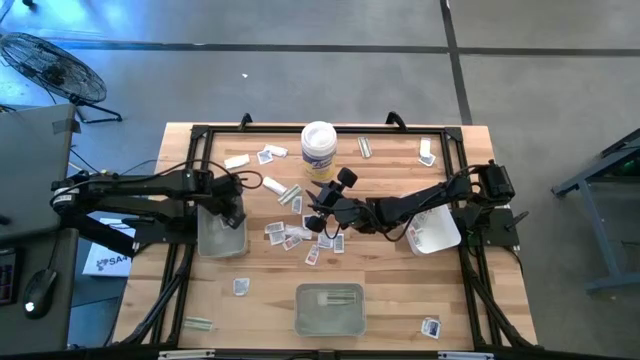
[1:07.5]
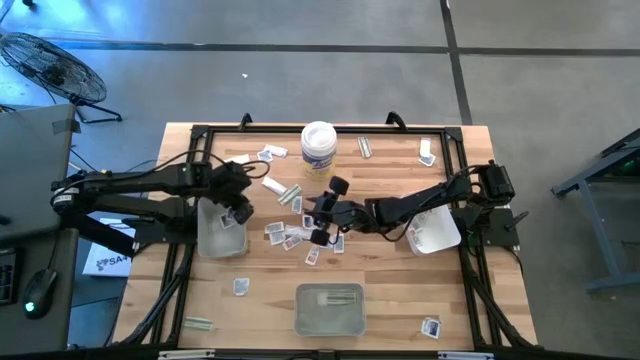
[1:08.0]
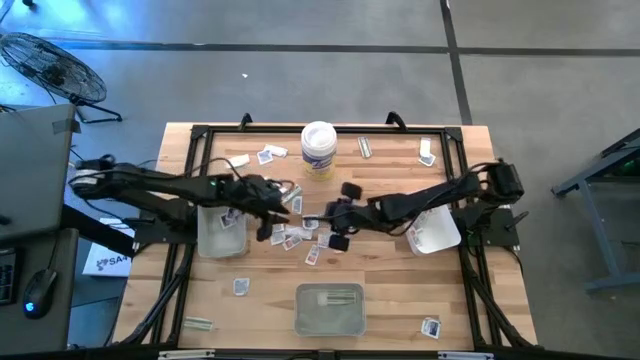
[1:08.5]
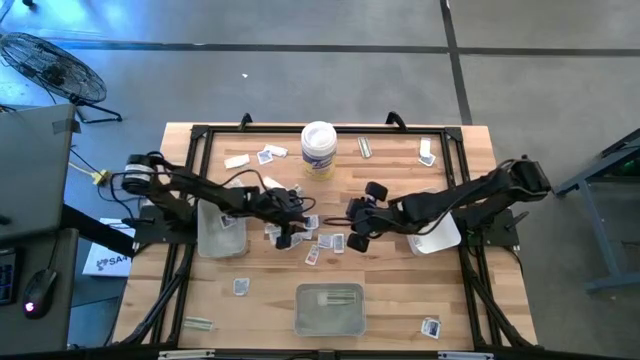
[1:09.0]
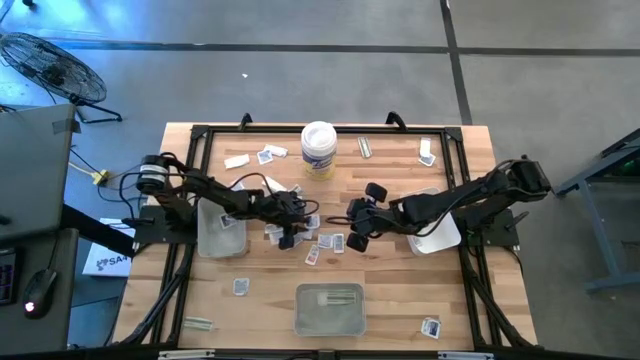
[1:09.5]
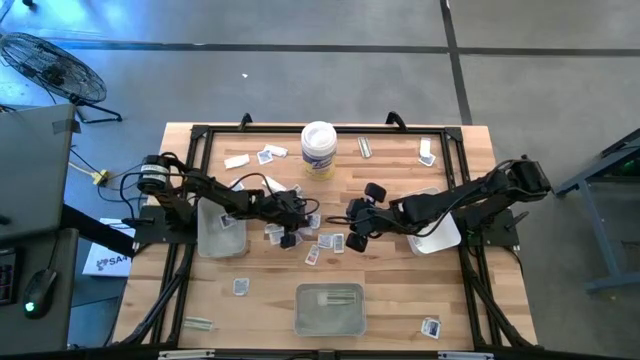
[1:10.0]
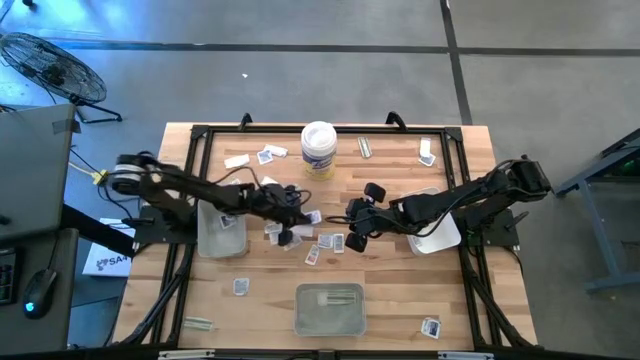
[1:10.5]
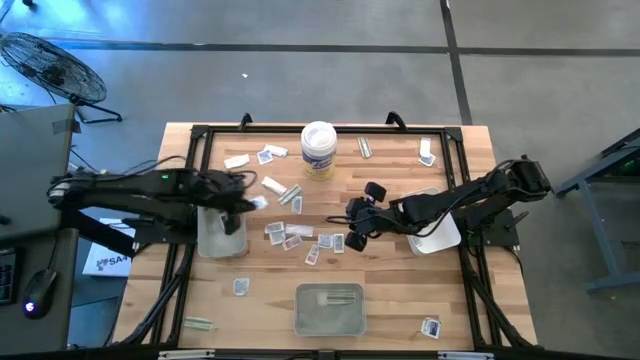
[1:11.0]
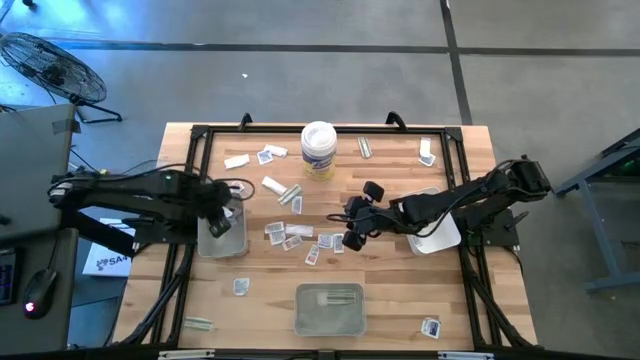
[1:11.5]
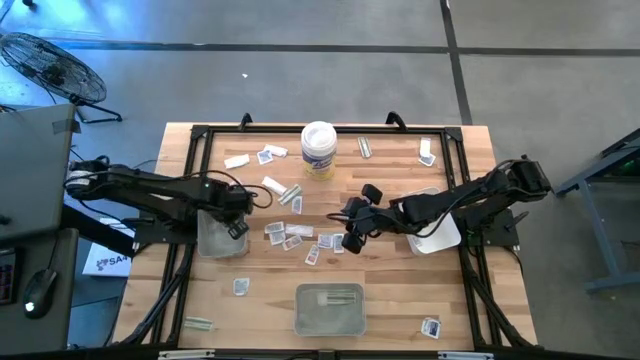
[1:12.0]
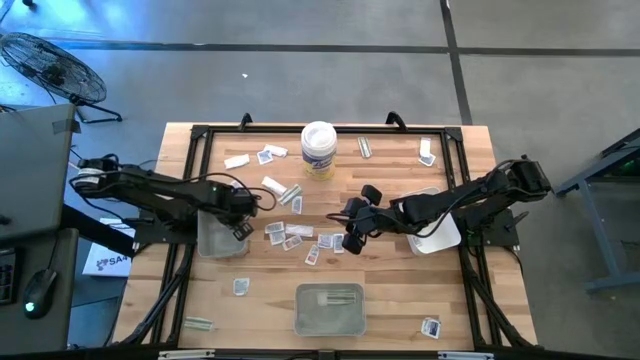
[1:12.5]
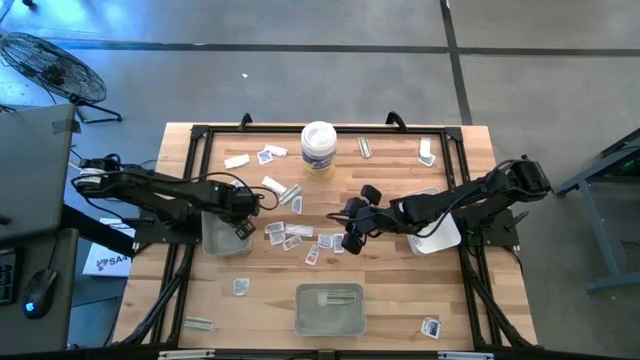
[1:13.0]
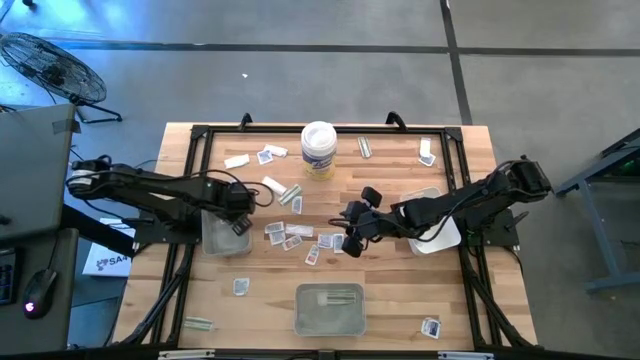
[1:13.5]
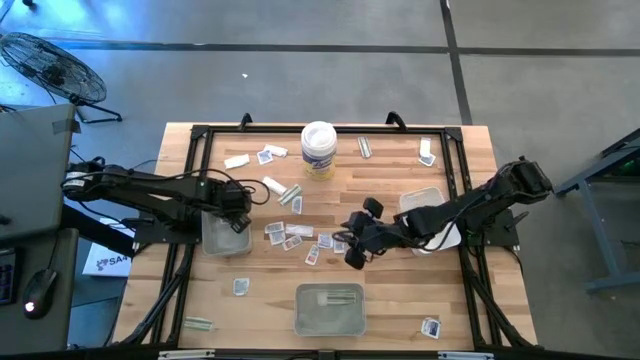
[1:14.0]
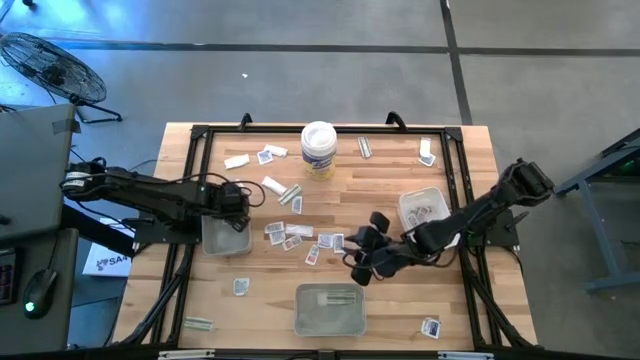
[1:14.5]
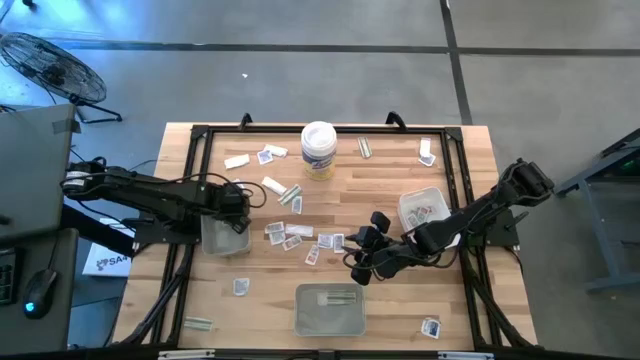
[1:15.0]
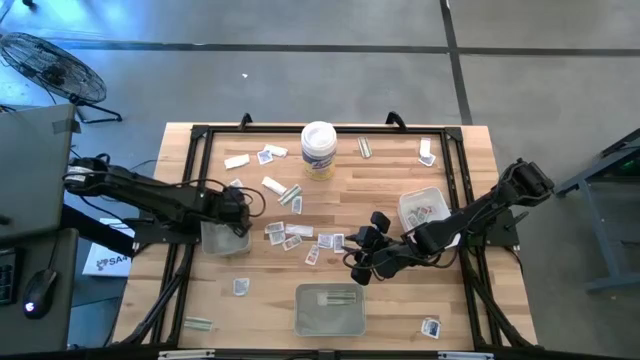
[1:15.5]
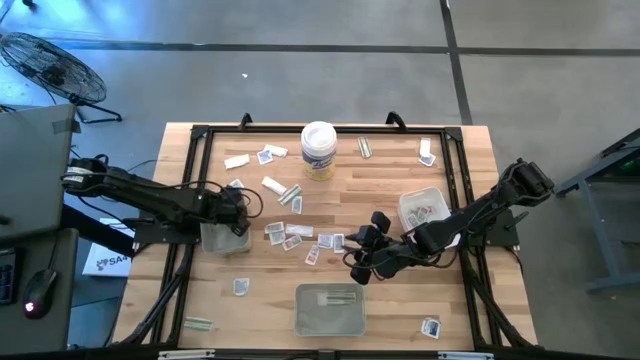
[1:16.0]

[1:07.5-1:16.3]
Task: Pick & Place First Aid Supplies
Put the blue alcohol pad into the top gray bin

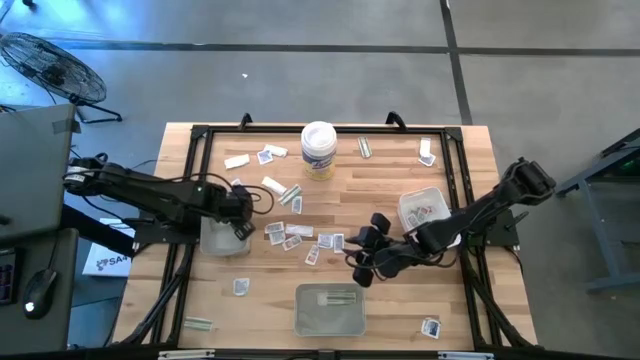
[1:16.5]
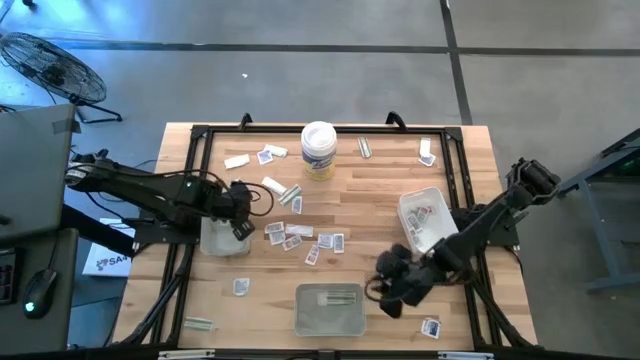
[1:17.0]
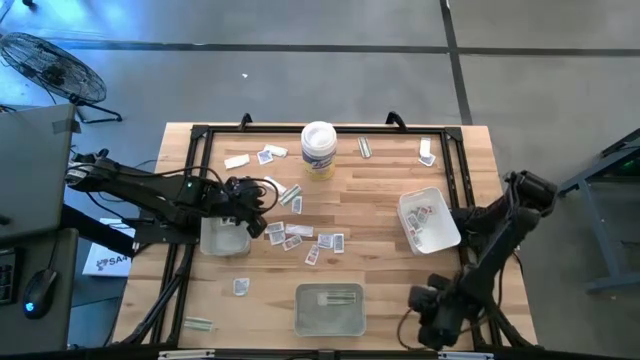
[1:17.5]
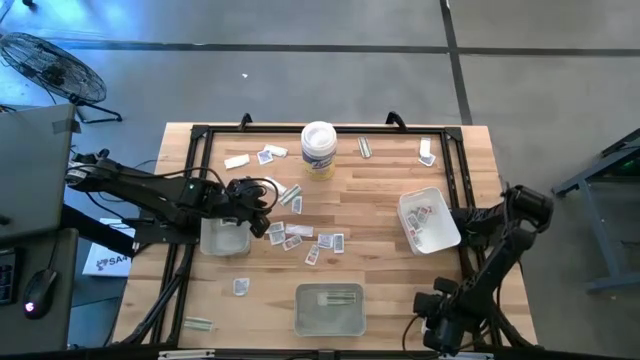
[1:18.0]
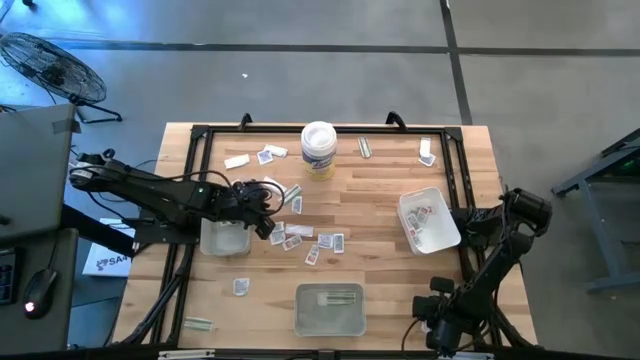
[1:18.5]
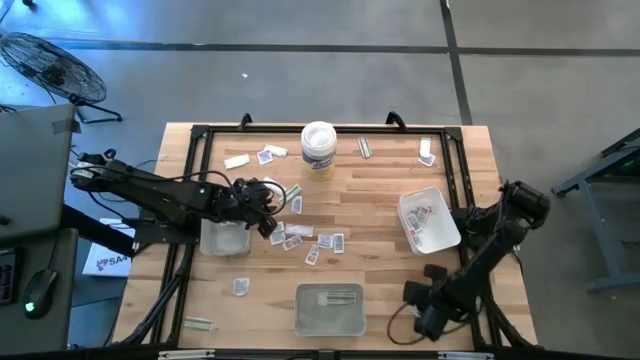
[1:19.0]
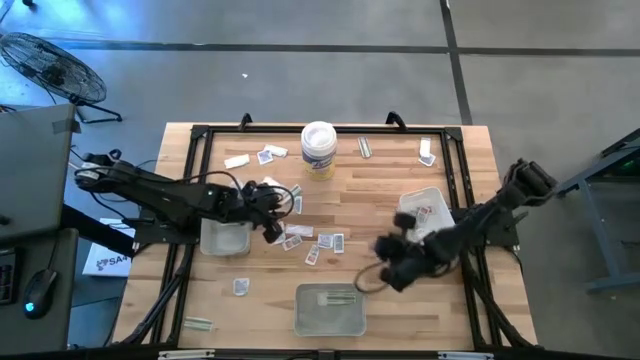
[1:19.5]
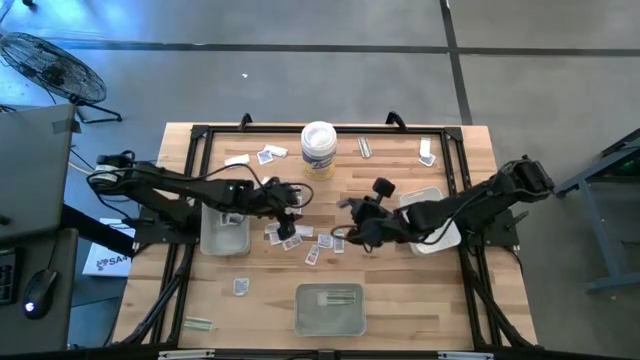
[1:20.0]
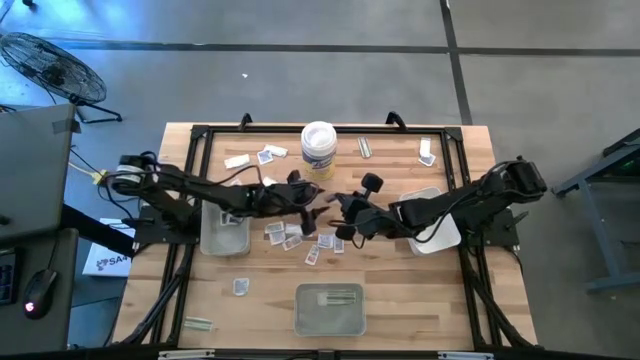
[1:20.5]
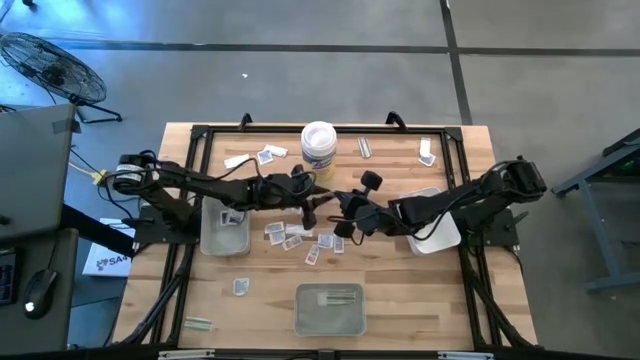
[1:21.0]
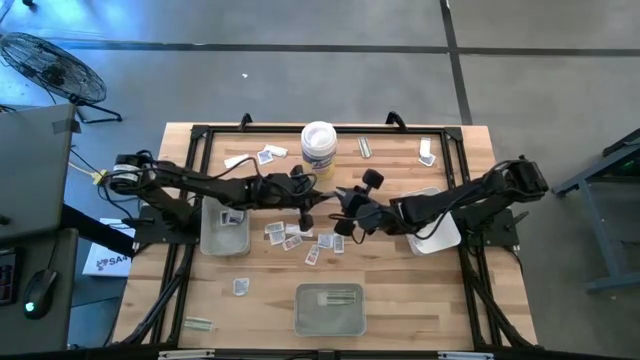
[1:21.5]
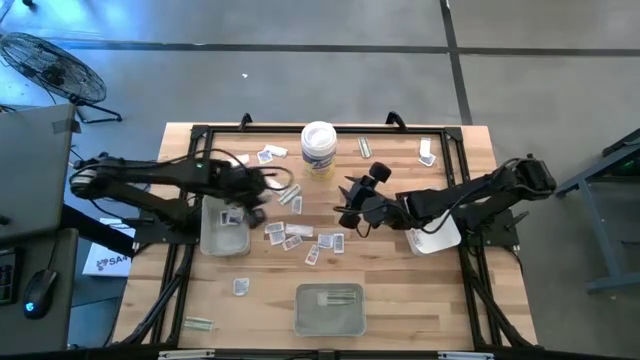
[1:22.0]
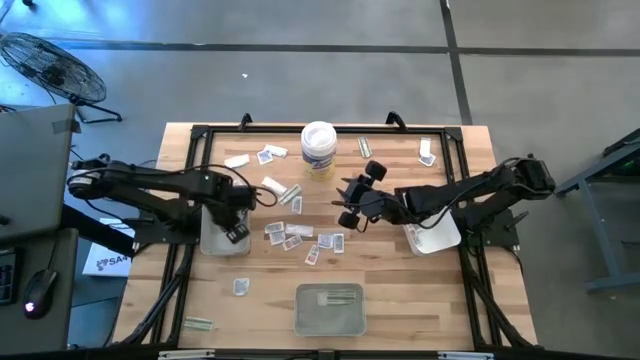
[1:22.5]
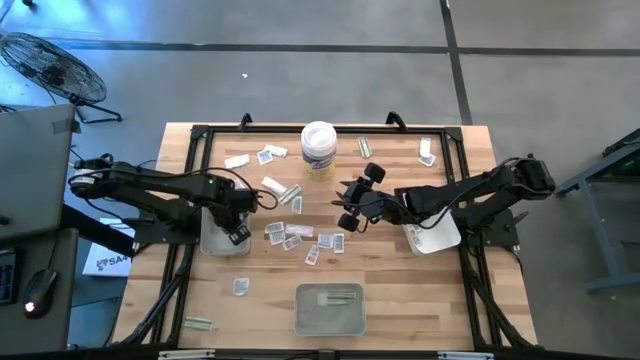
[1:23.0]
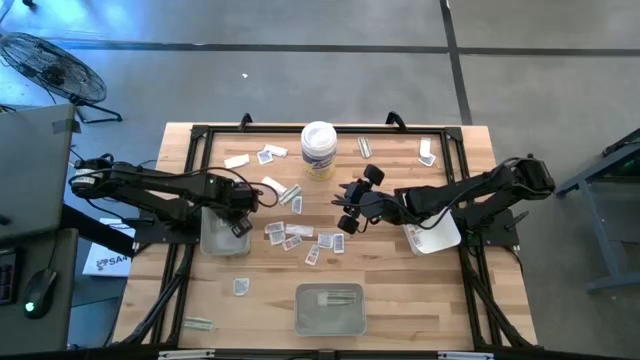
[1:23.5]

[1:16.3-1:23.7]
Put the blue alcohol pad into the top gray bin

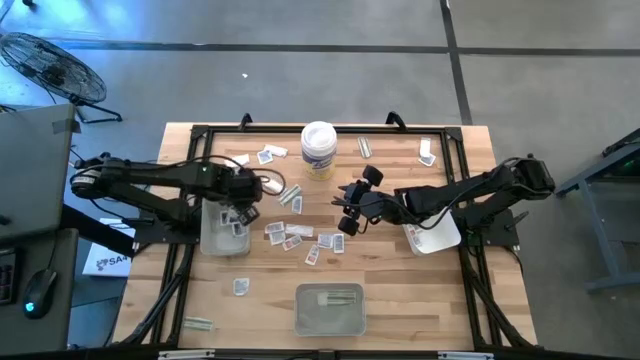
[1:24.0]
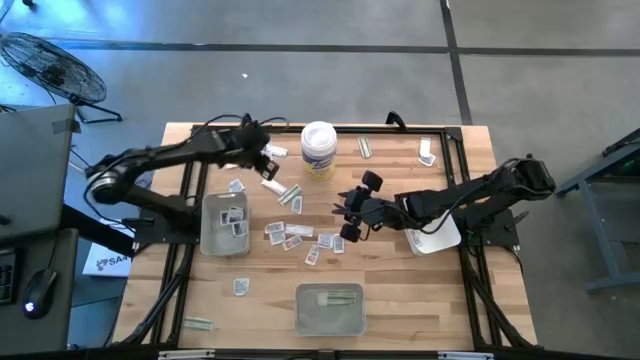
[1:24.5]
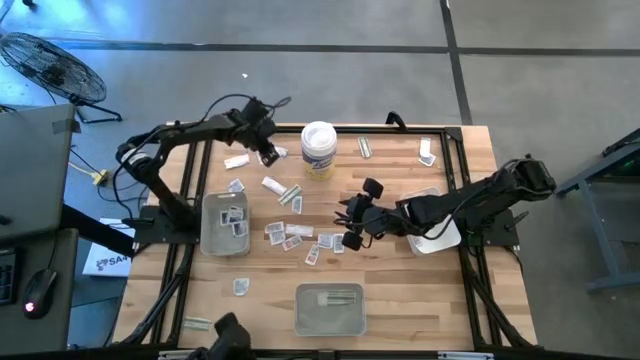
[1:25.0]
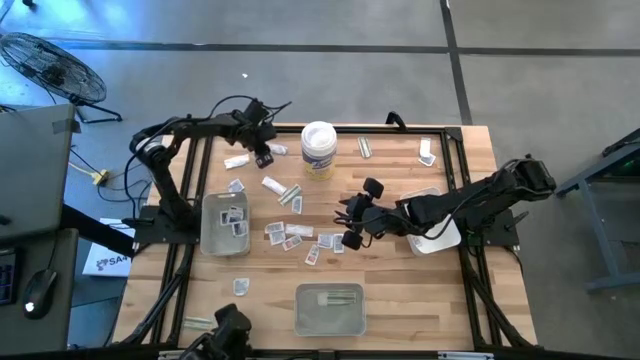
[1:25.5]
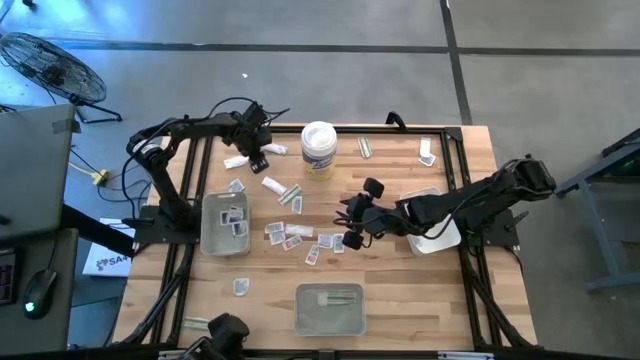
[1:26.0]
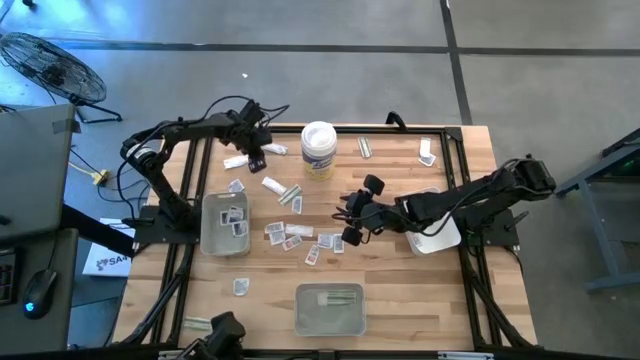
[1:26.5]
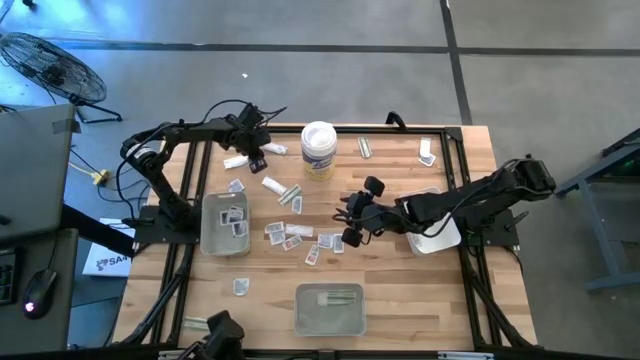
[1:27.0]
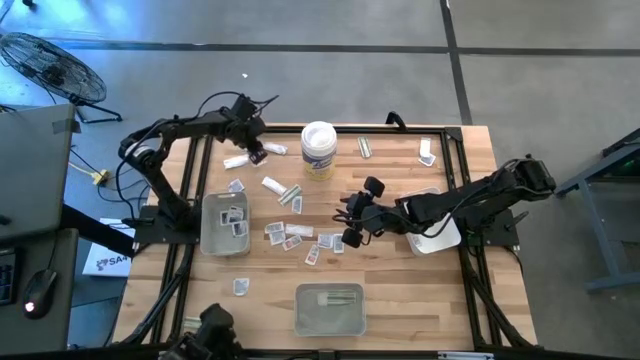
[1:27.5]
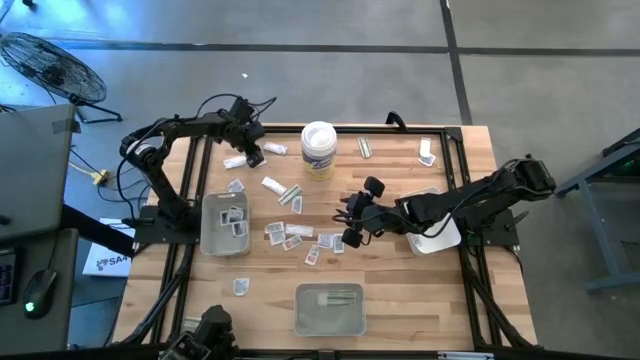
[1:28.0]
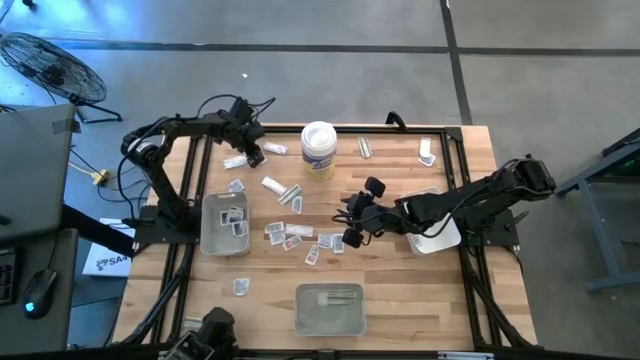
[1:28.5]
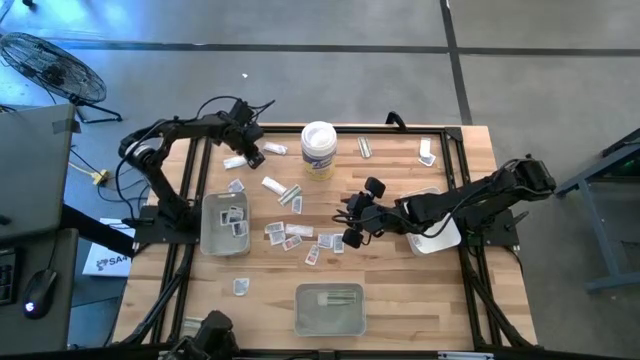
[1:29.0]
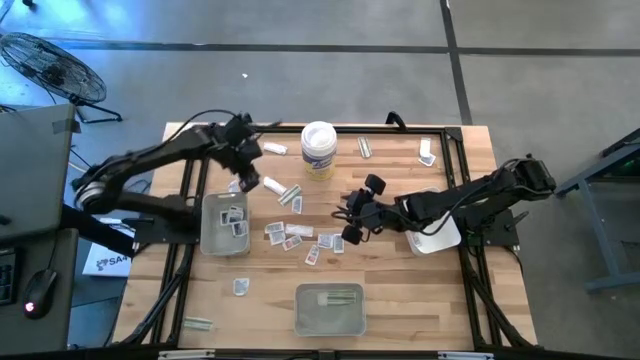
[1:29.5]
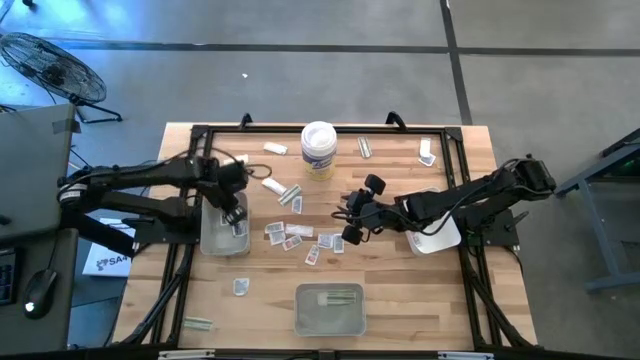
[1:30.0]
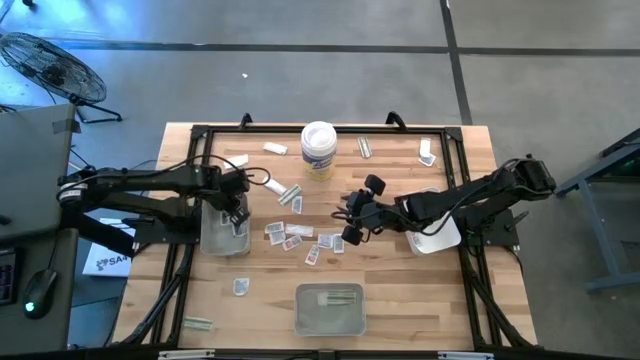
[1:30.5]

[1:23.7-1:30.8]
Put the blue alcohol pad into the top gray bin
